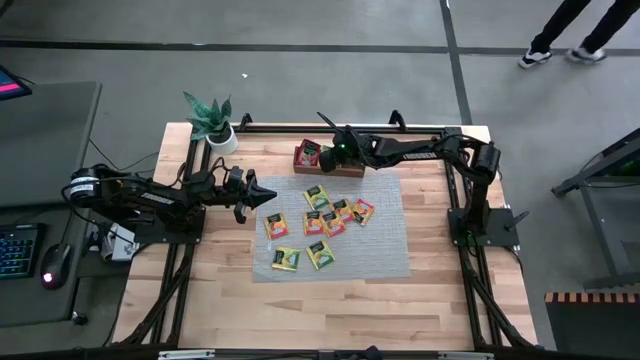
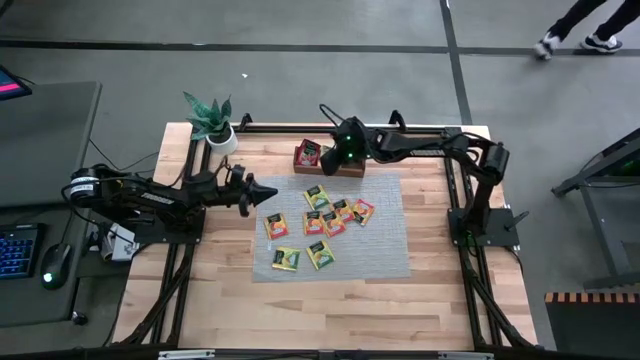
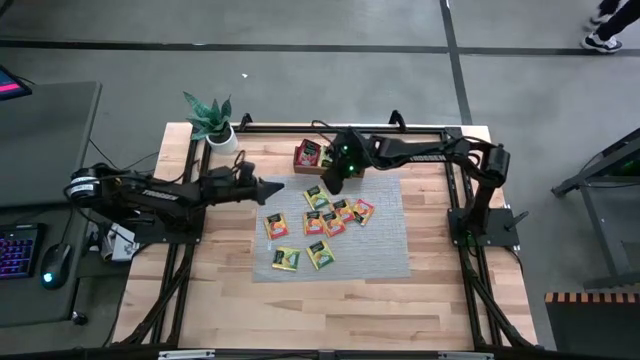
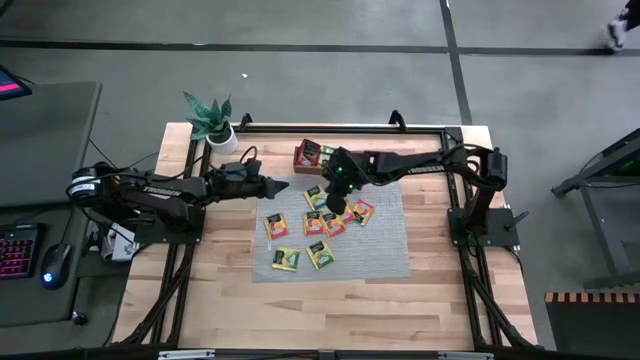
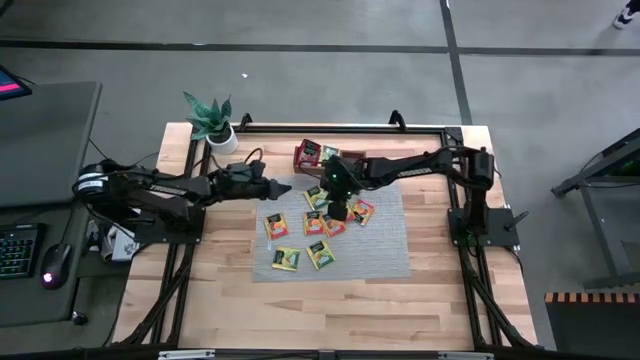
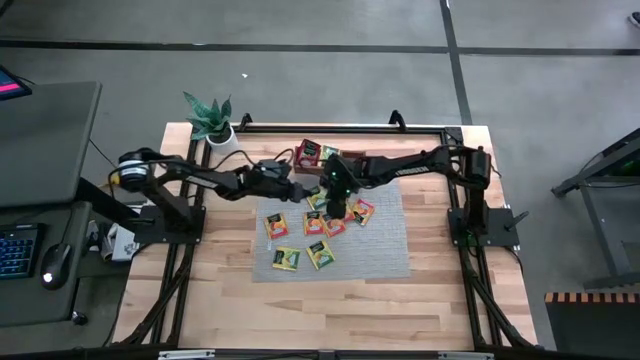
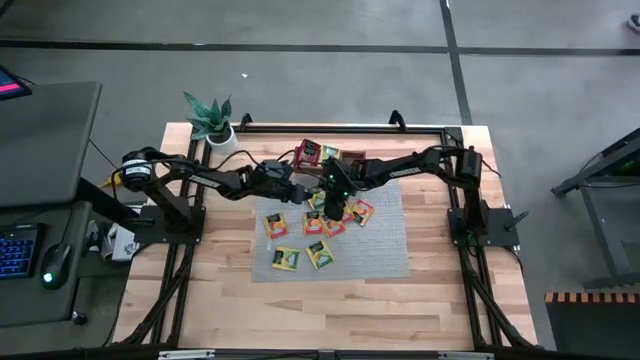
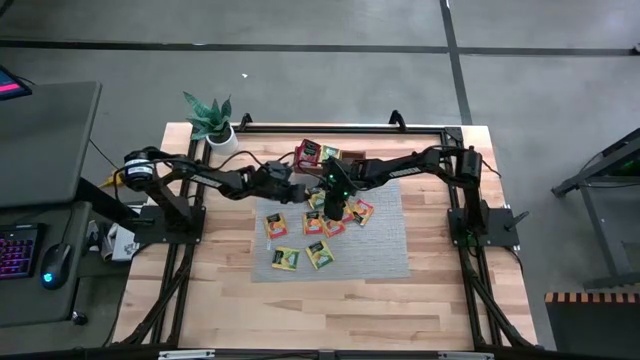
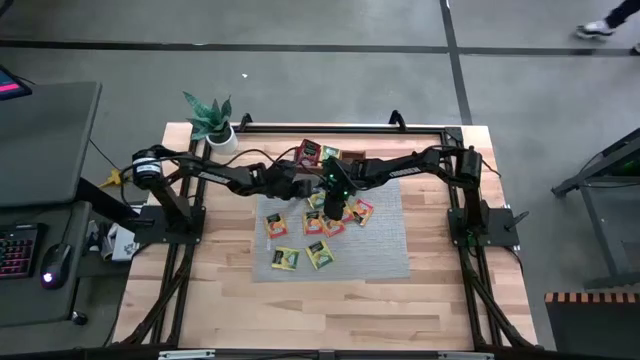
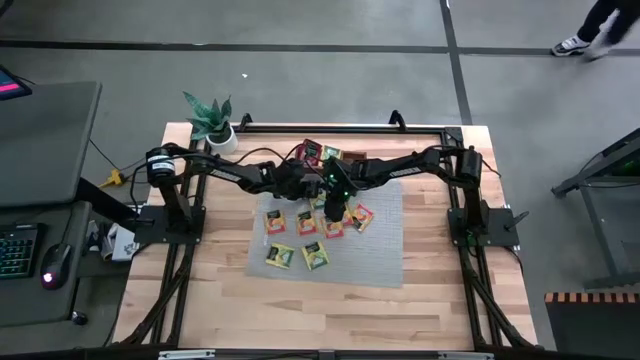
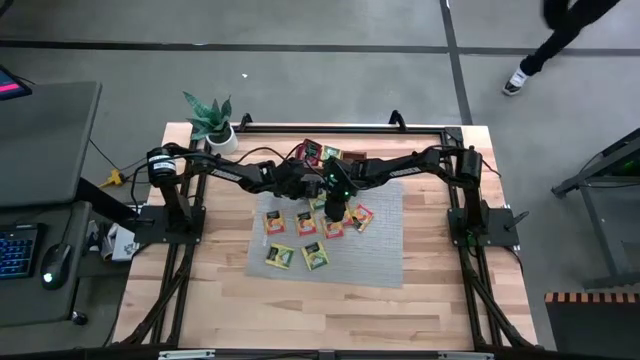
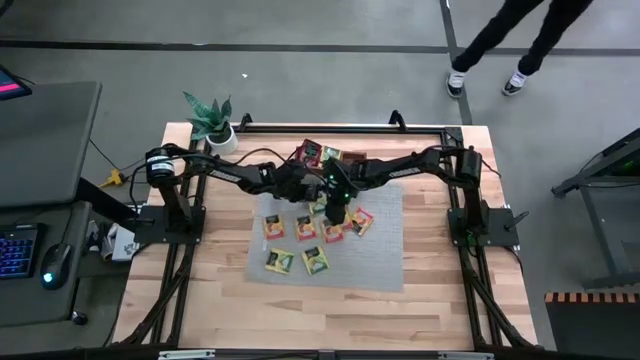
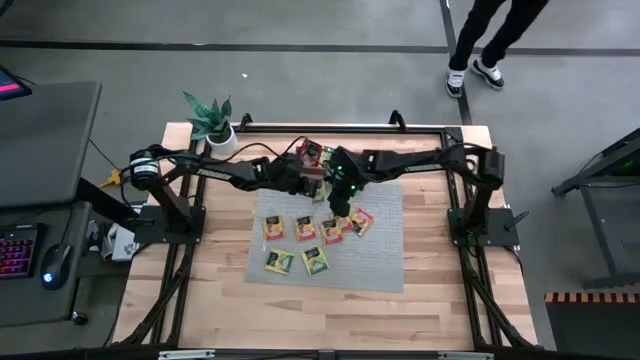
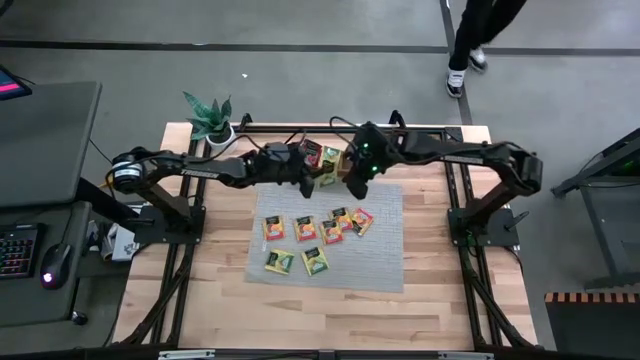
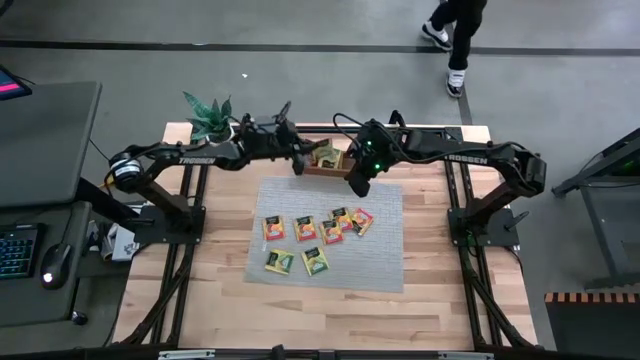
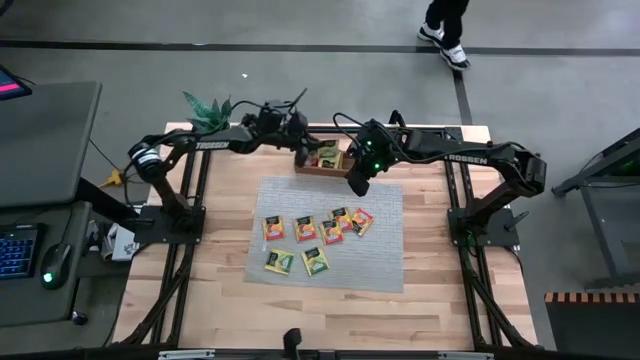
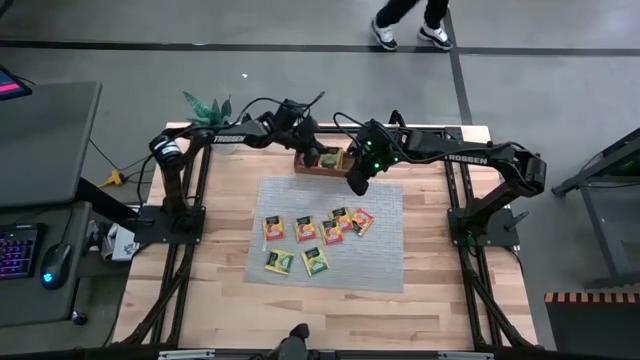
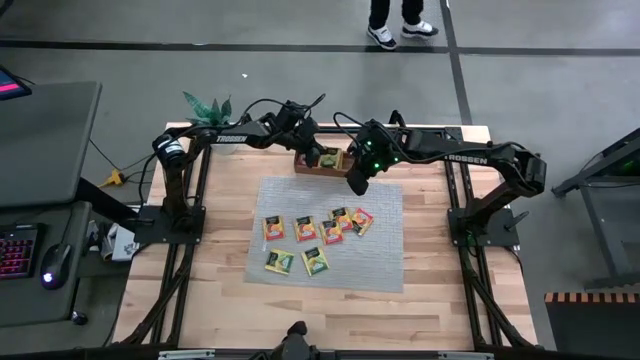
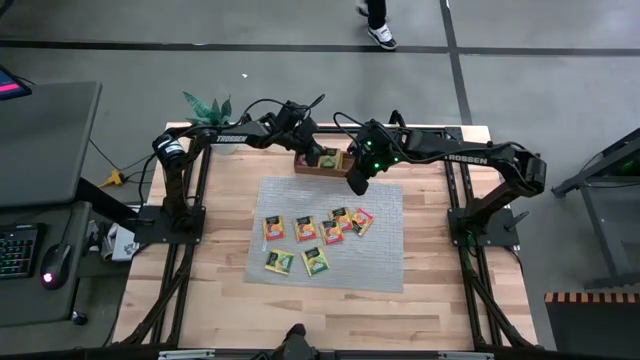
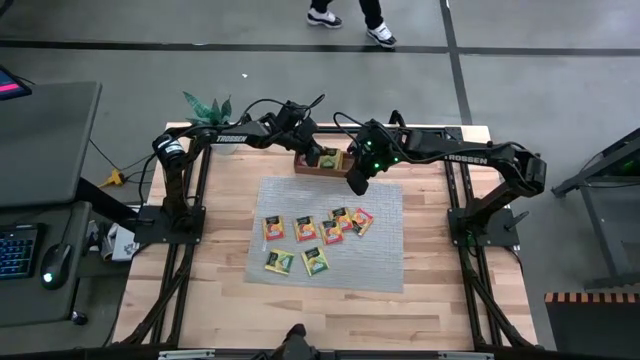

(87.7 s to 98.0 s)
Task: Pick & Place Tea
Put the yellow tea bag into the middle section of the wooden organizer

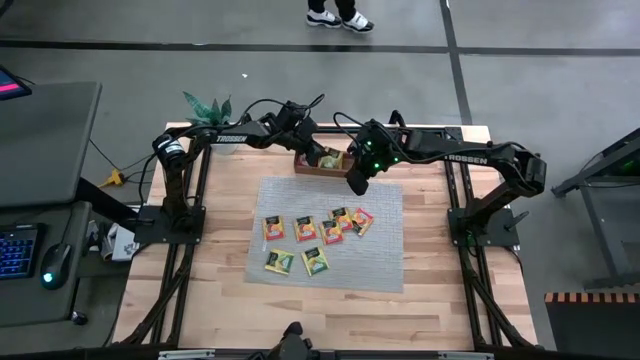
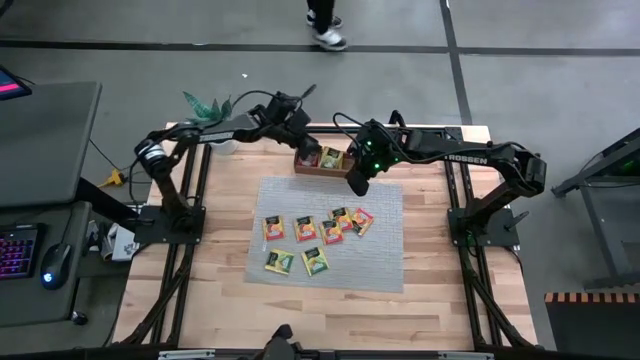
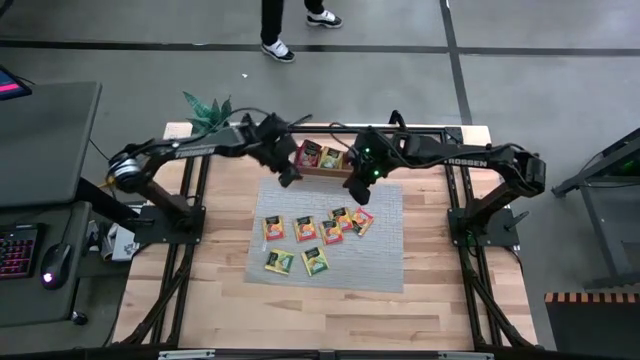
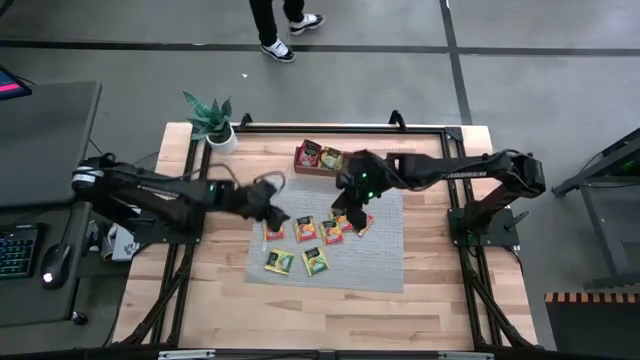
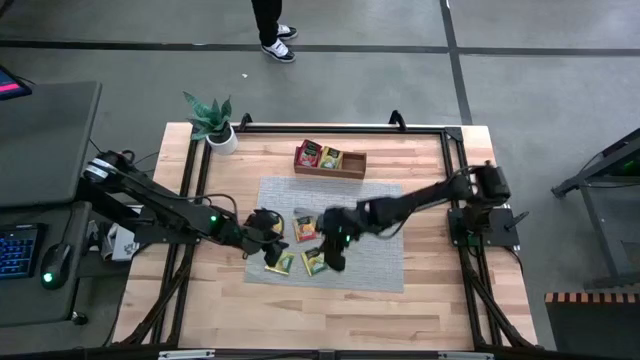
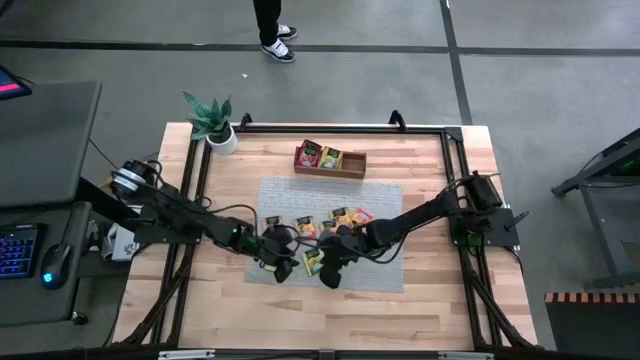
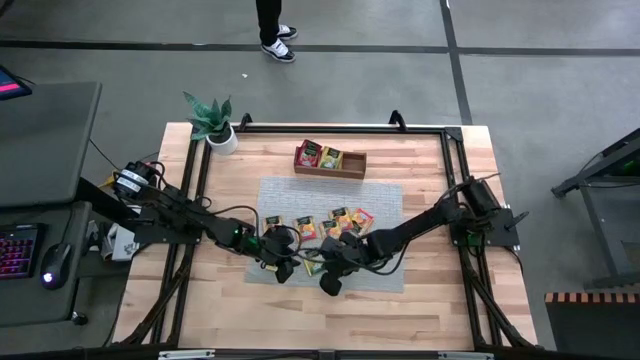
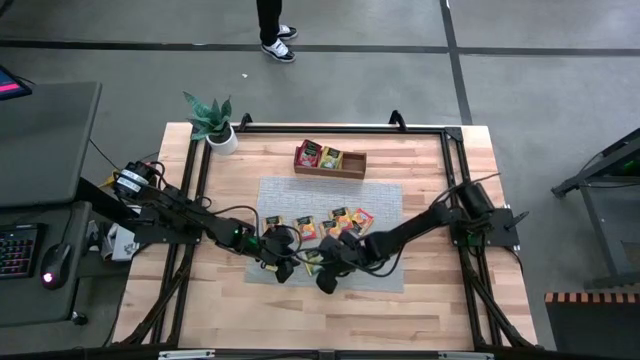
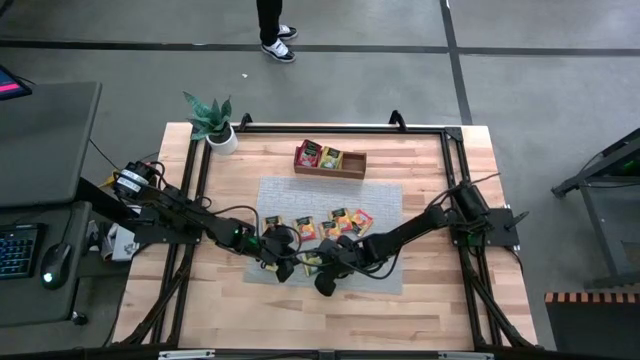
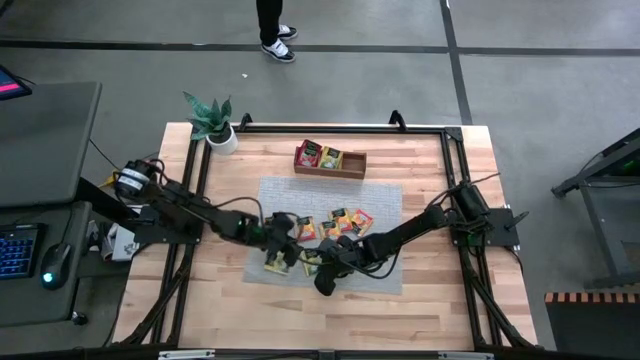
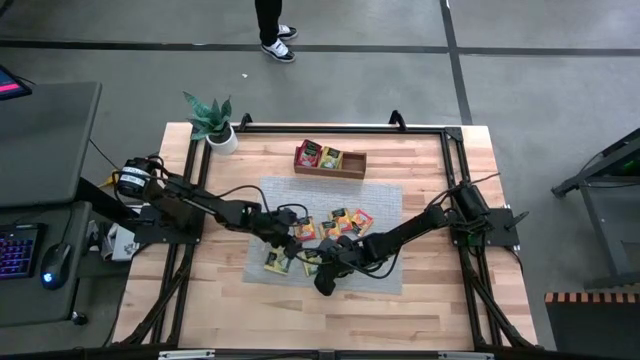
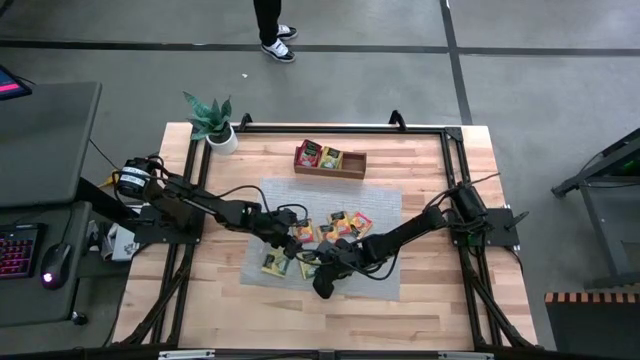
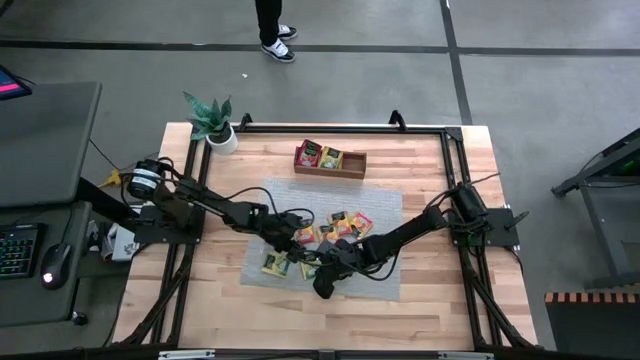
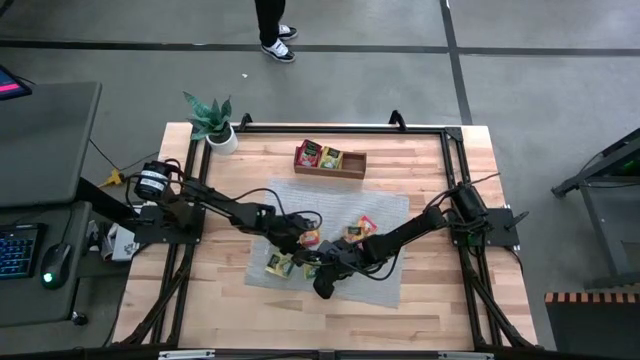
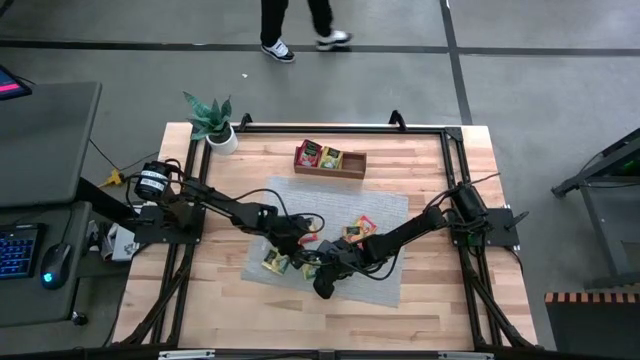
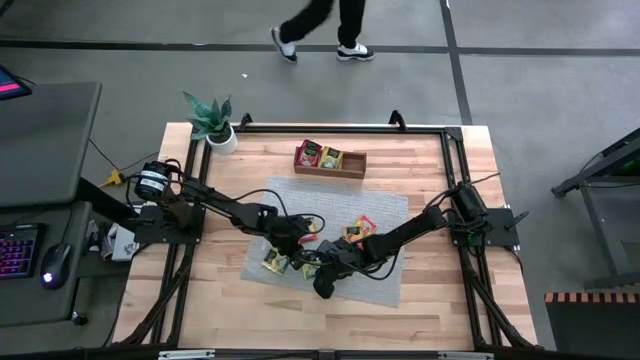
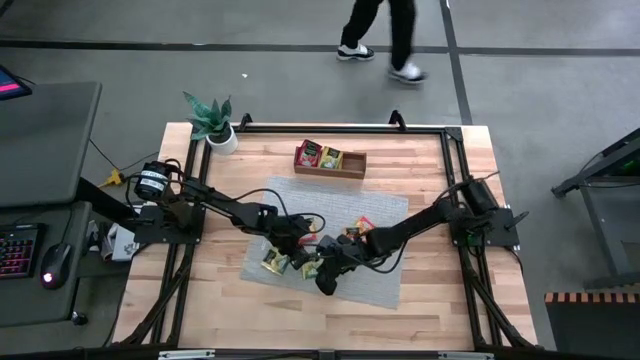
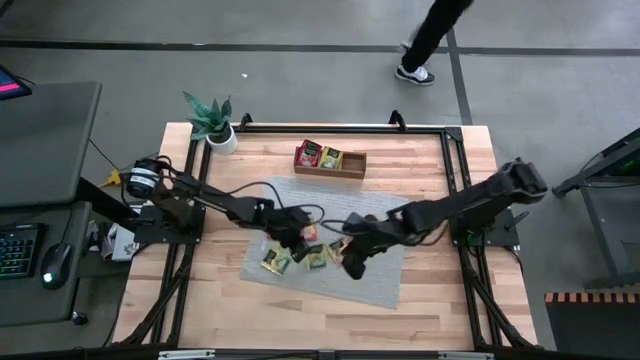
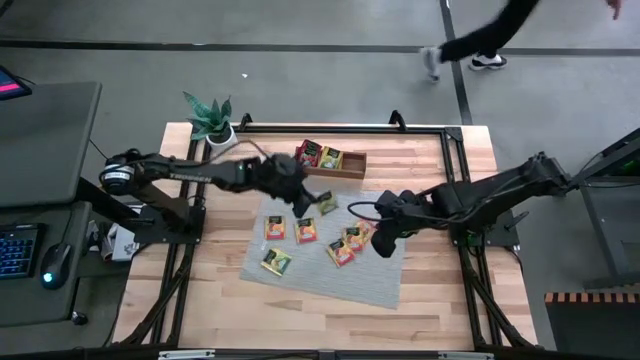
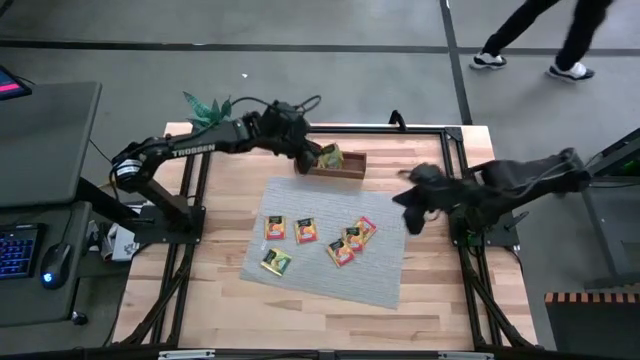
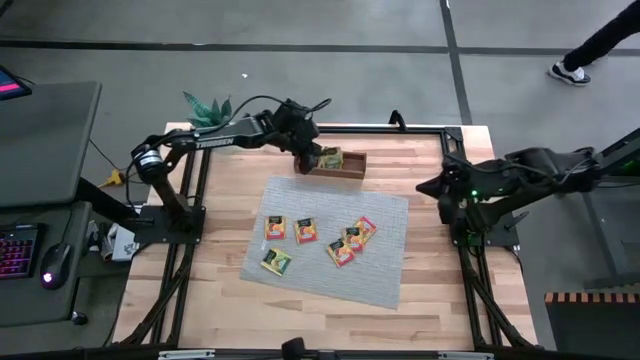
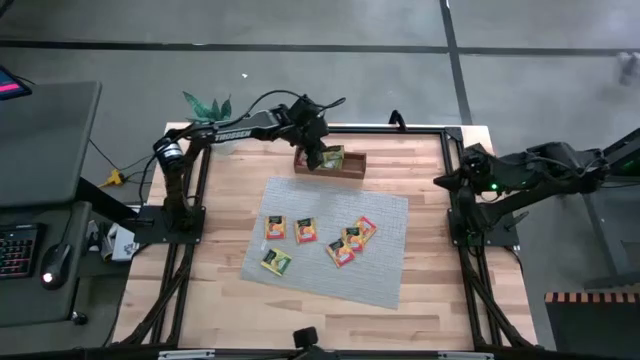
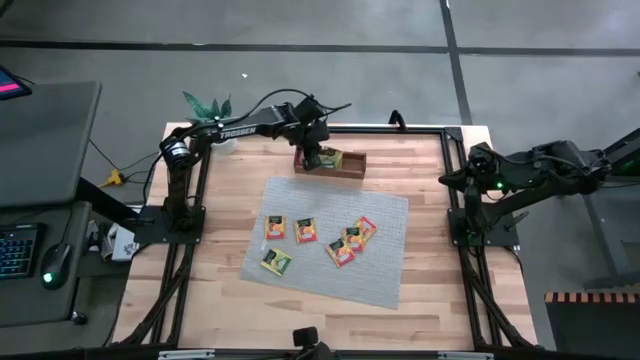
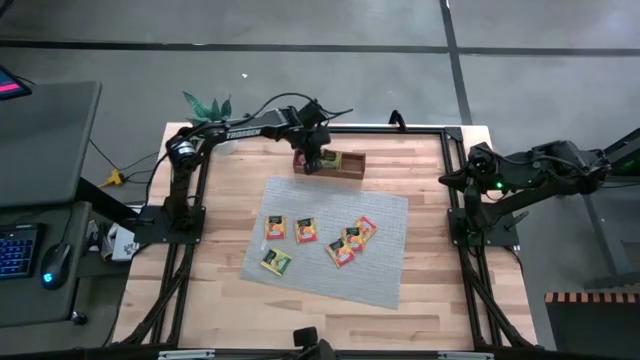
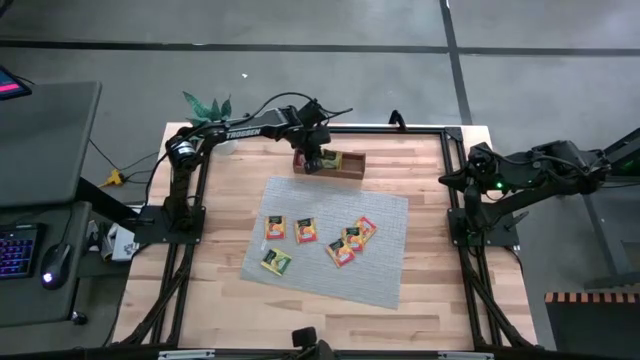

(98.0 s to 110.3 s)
Put the yellow tea bag into the middle section of the wooden organizer
